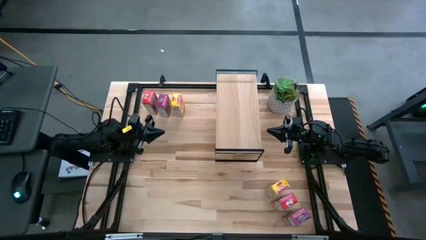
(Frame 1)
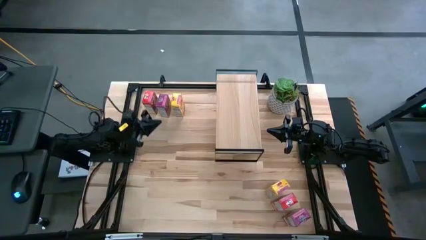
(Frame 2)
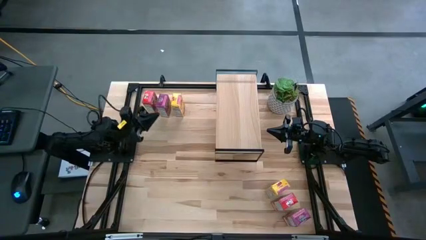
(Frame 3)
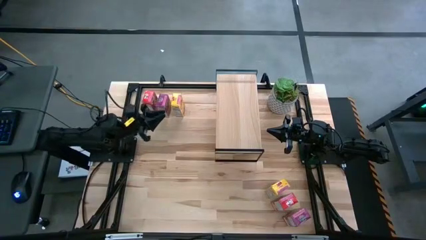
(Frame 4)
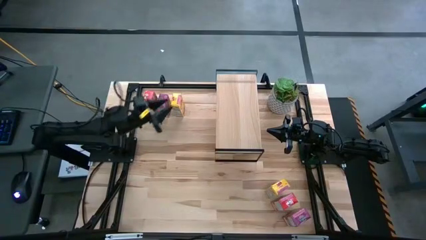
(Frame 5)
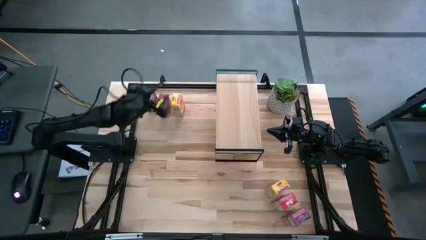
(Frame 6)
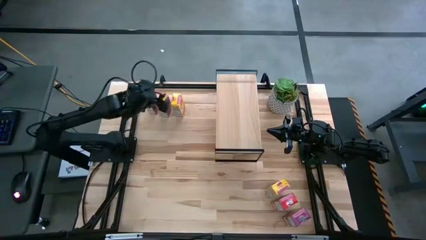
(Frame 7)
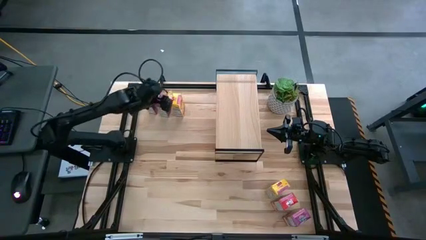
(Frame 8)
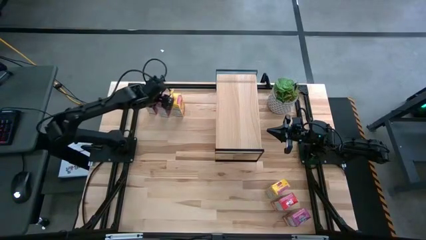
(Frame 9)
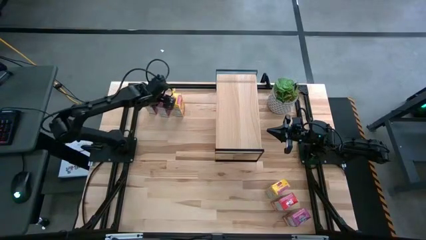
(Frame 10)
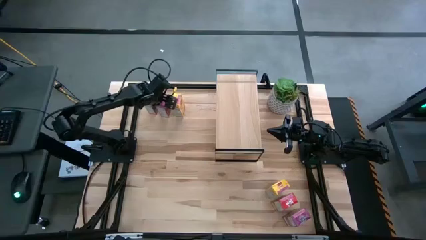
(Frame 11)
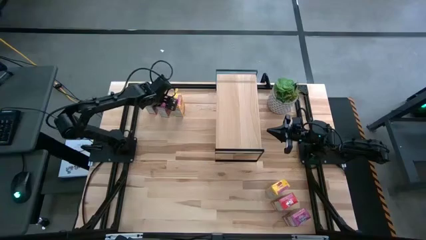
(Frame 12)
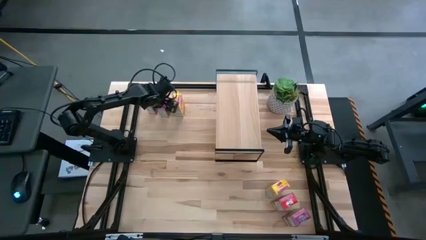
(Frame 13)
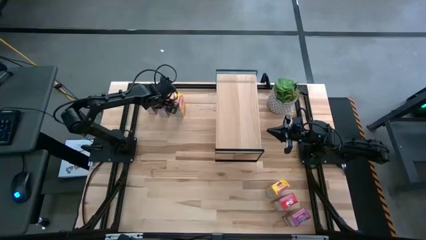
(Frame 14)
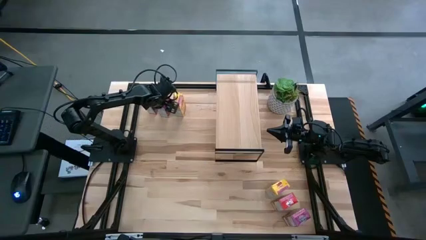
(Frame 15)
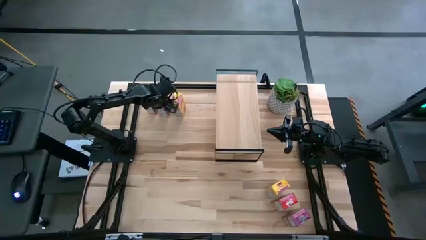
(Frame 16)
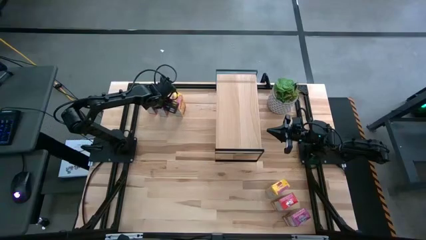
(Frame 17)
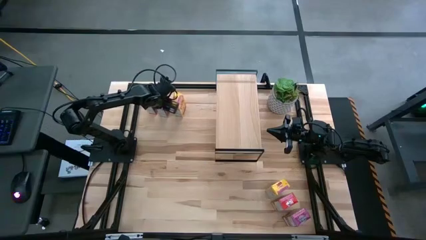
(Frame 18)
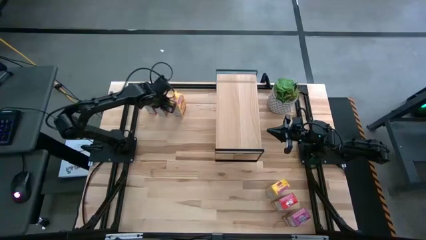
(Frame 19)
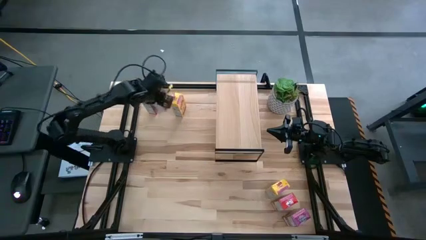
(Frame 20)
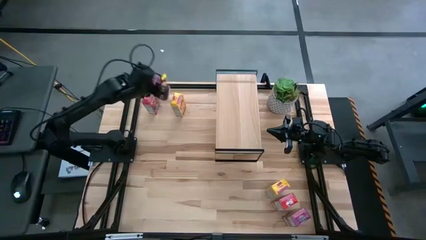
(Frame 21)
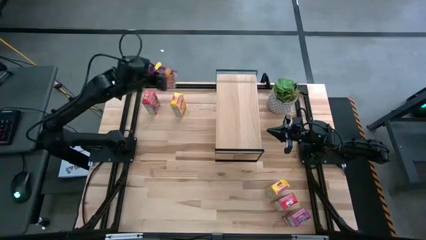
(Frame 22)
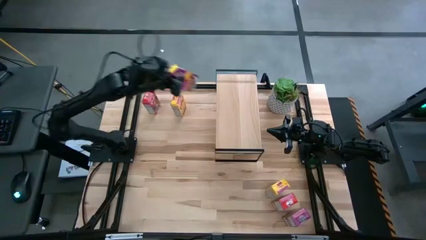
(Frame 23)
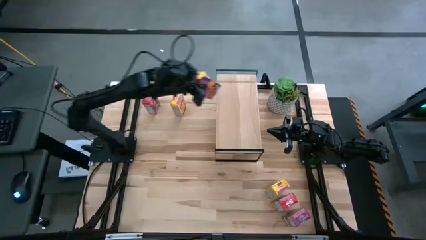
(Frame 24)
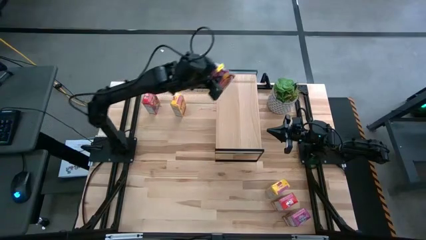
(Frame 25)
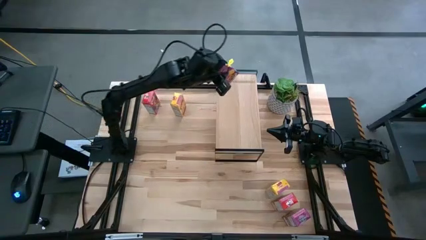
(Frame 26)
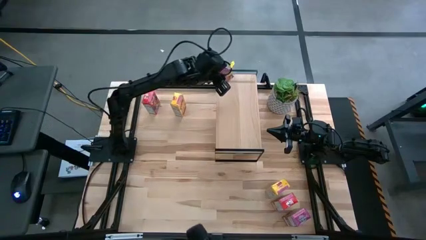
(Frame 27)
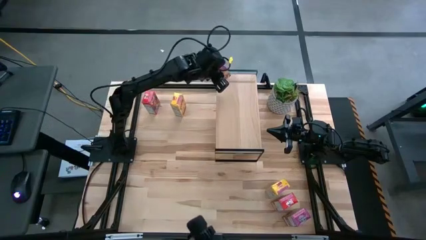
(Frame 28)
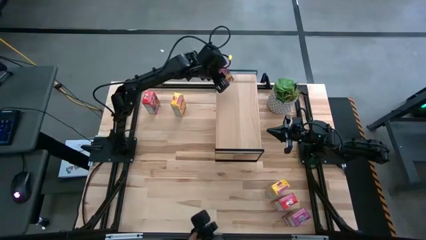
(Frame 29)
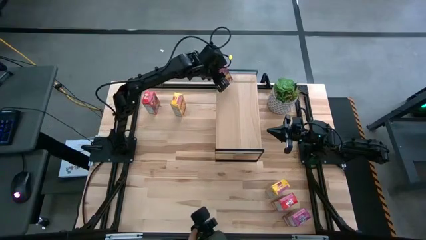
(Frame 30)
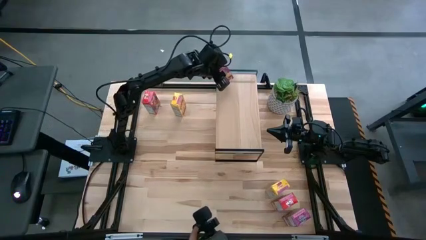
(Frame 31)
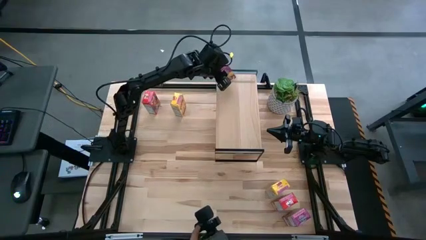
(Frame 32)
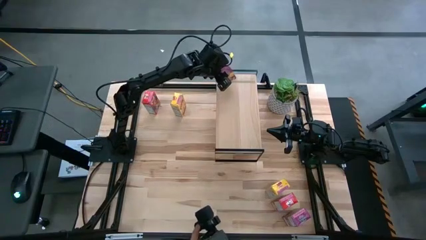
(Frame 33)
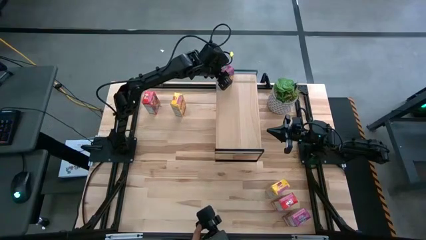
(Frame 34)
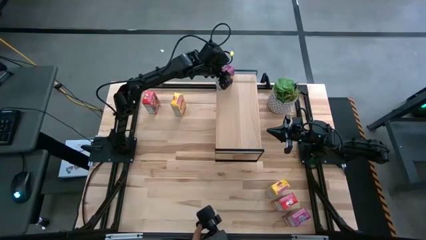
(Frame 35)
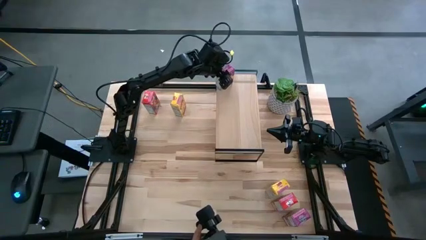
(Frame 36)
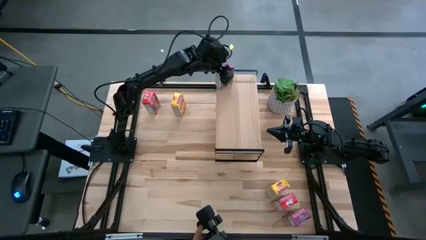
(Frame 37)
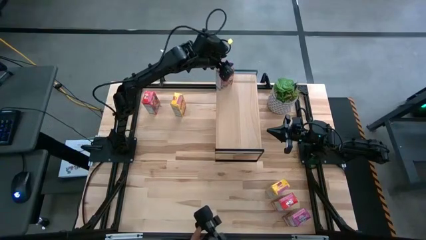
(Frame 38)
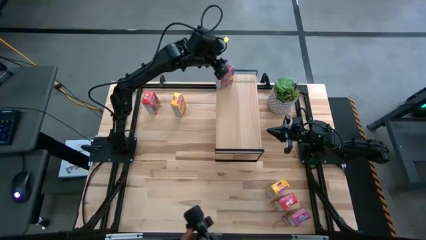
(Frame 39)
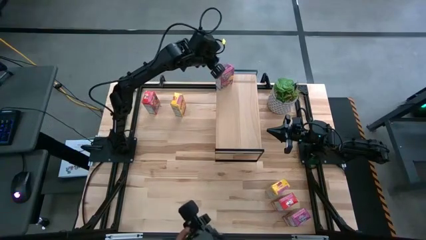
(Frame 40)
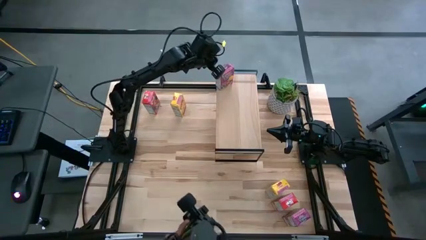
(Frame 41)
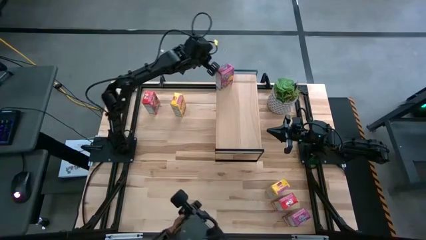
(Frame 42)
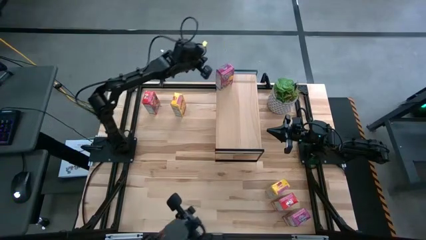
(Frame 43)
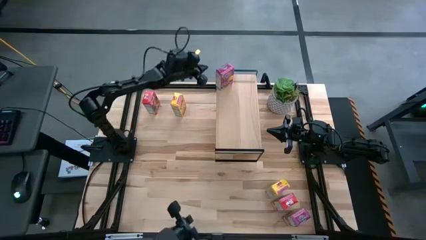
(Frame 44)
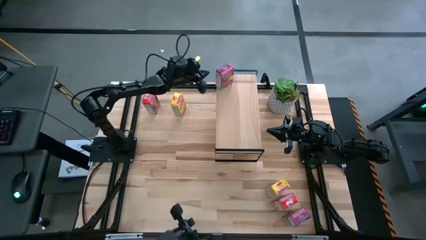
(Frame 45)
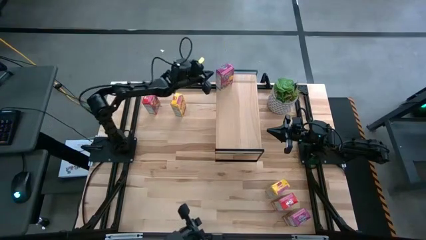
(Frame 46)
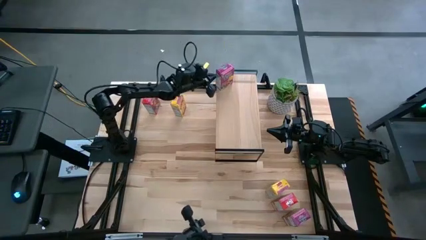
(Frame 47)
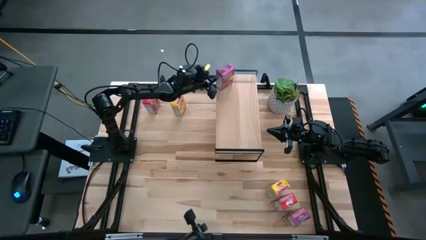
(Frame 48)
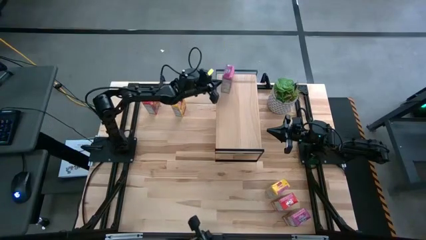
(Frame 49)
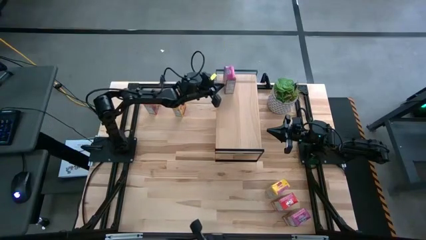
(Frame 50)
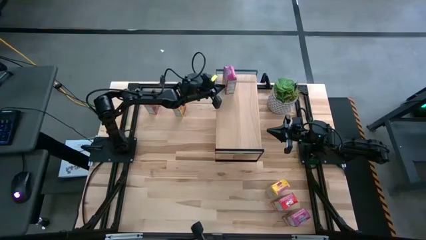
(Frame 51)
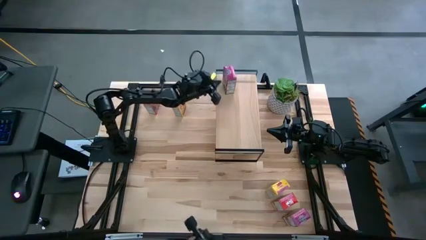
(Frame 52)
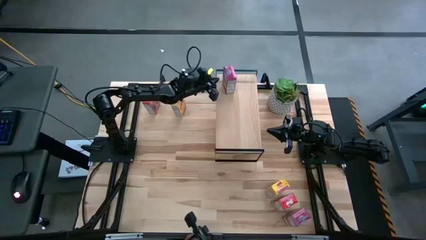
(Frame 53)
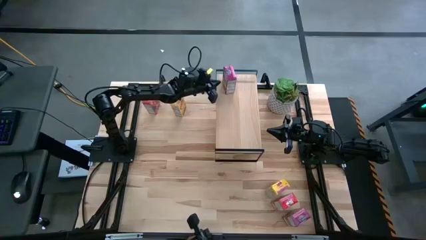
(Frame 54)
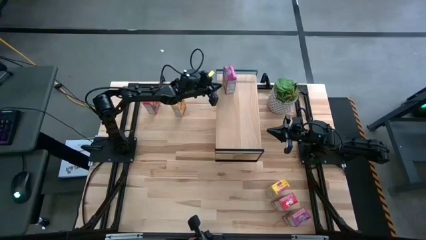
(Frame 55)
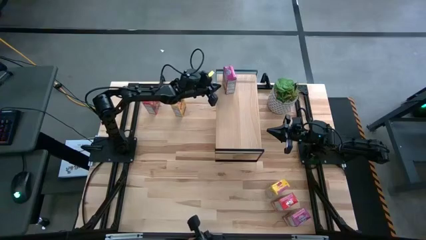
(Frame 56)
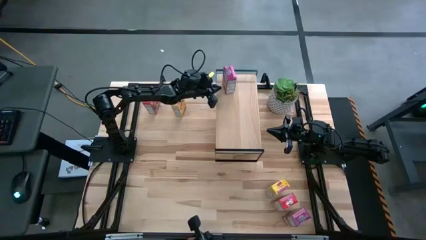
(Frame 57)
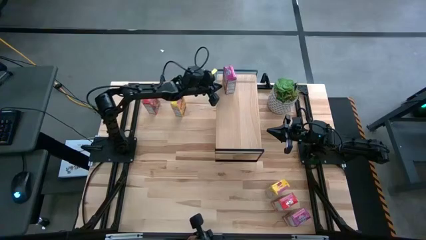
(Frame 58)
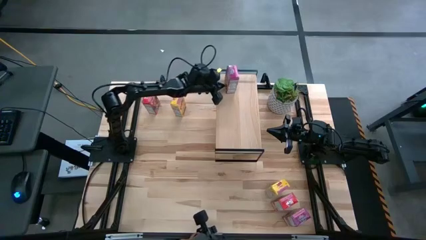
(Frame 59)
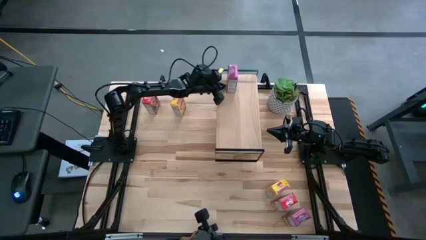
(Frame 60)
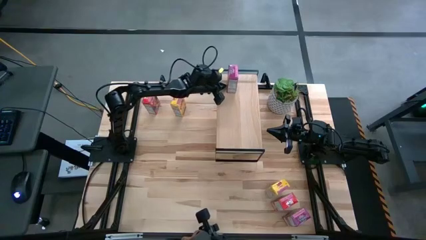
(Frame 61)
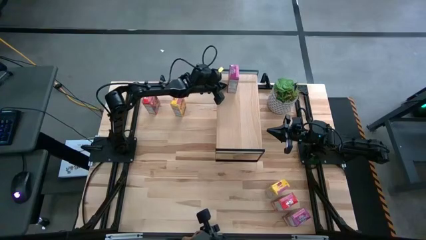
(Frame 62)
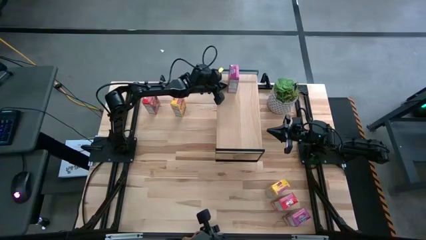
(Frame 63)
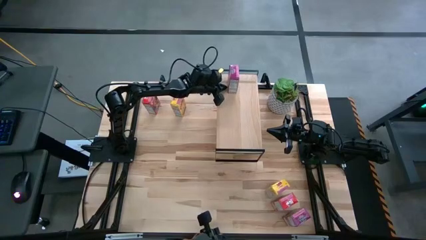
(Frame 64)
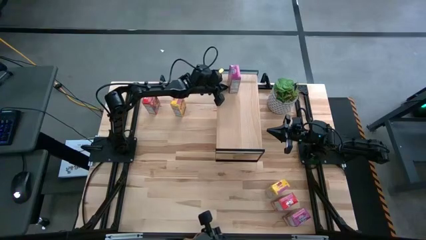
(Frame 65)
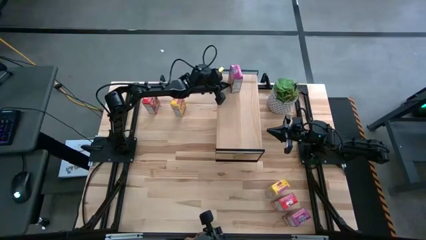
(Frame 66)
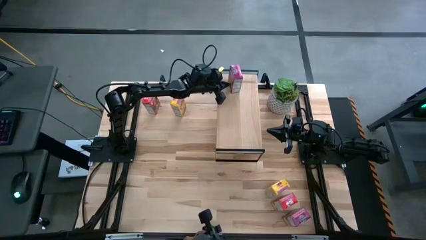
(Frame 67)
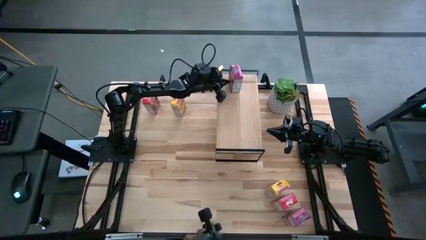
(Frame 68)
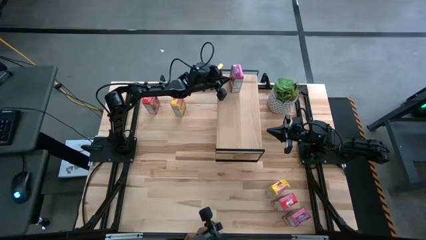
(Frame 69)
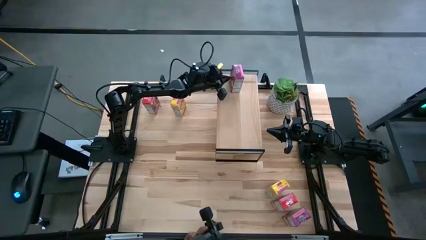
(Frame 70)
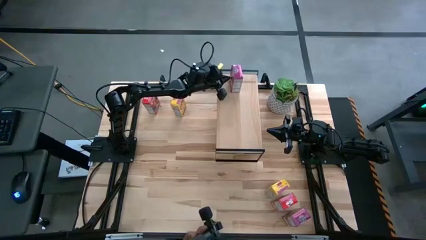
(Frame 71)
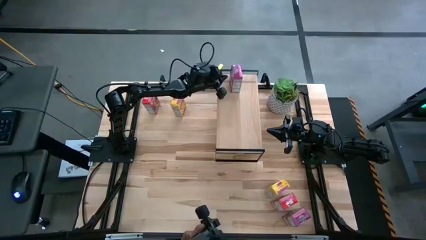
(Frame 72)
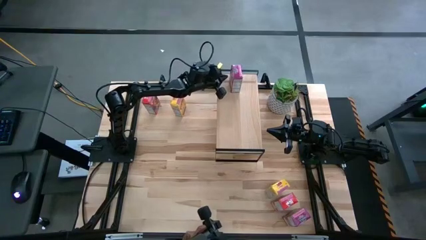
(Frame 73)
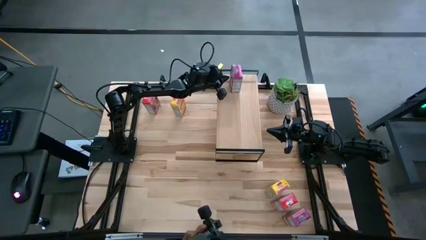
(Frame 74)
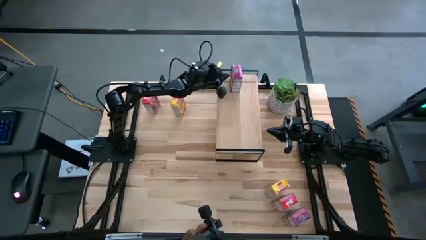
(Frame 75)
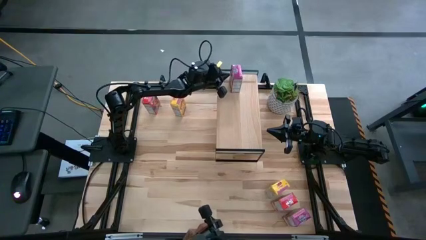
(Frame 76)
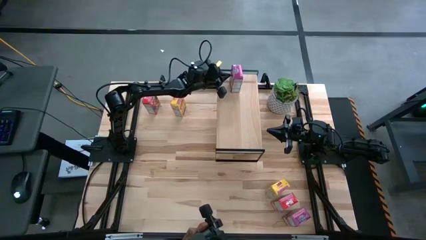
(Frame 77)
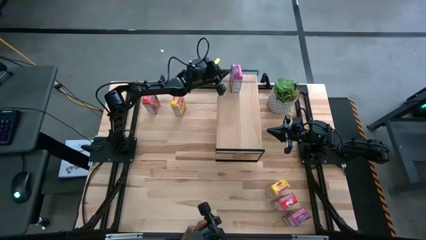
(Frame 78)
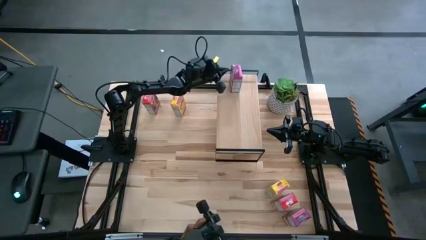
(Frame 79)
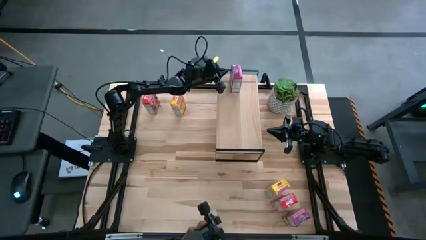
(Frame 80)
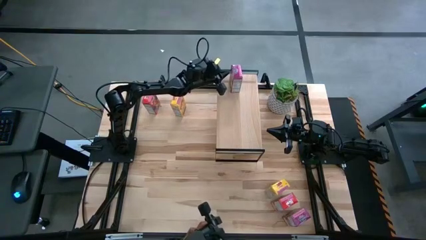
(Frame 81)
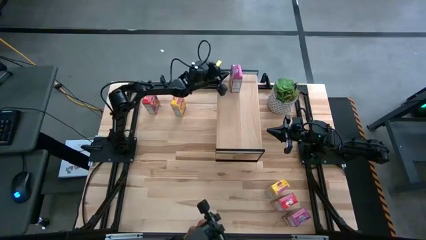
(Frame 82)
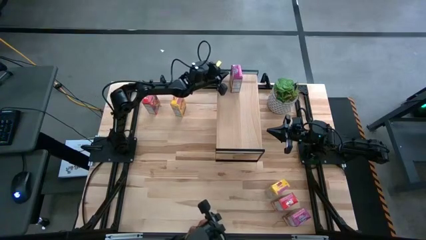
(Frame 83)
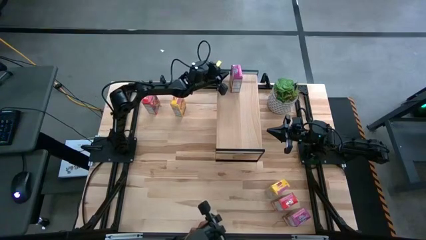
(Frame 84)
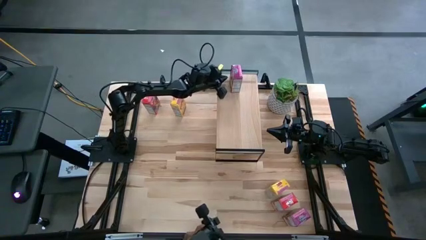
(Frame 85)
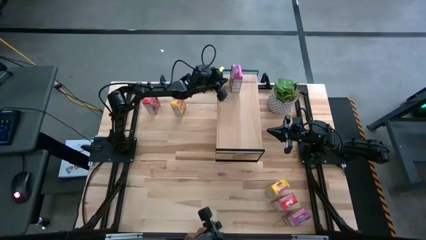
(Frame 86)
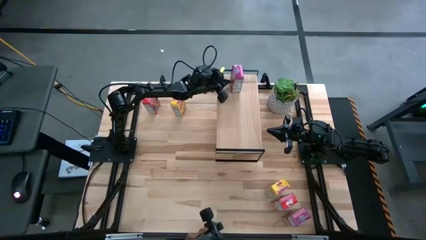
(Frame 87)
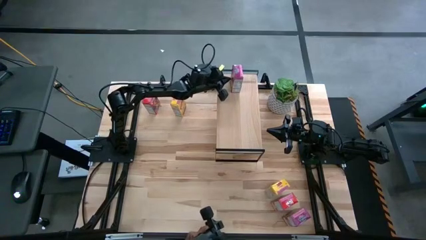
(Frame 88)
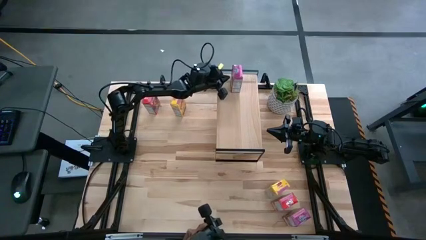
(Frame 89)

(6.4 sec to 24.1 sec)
Task: Stack cereal on shelf
Put the top purple cereal box on the shelf
